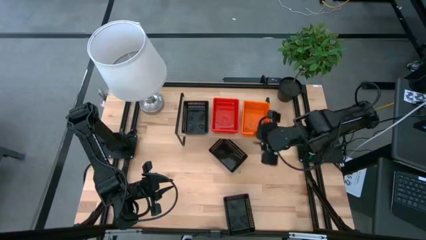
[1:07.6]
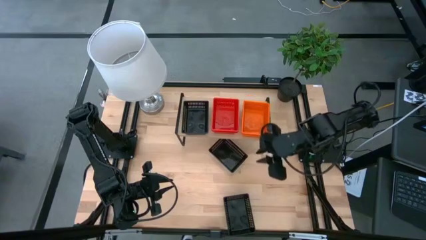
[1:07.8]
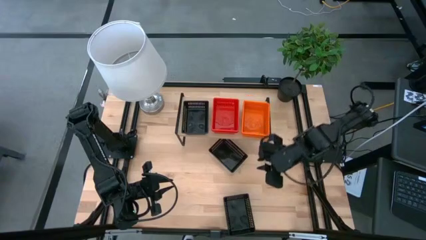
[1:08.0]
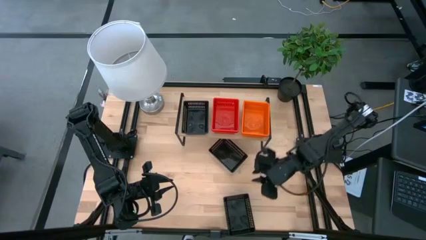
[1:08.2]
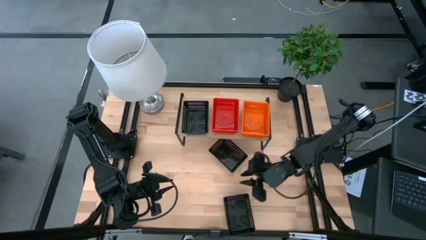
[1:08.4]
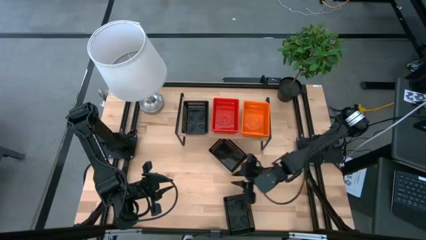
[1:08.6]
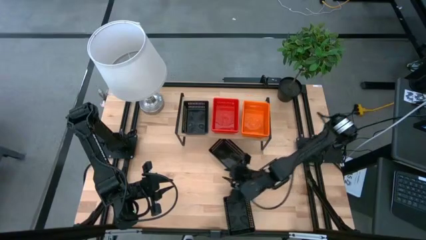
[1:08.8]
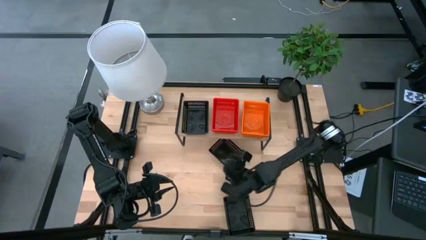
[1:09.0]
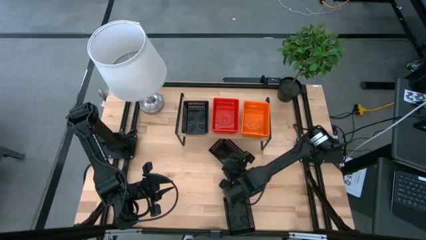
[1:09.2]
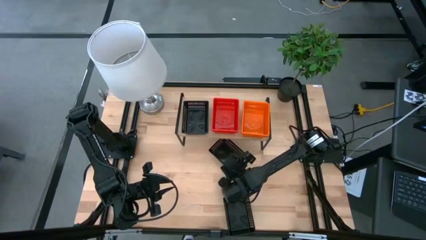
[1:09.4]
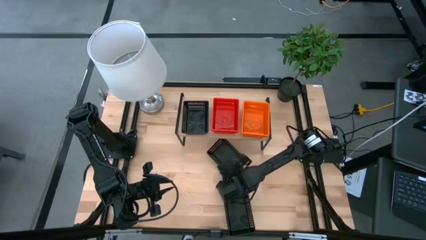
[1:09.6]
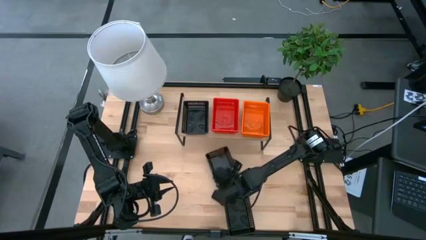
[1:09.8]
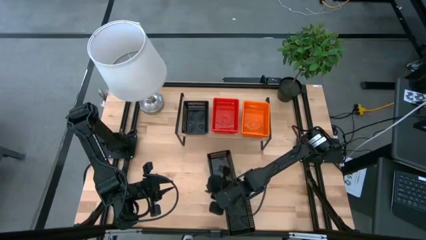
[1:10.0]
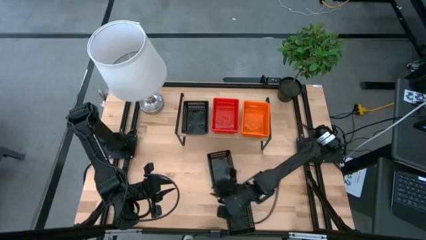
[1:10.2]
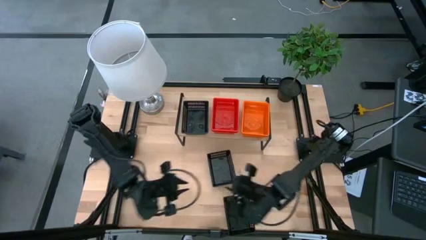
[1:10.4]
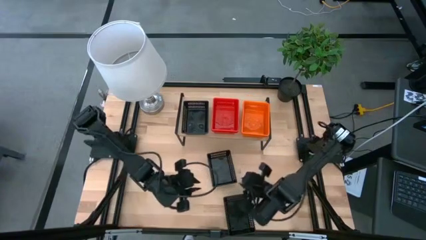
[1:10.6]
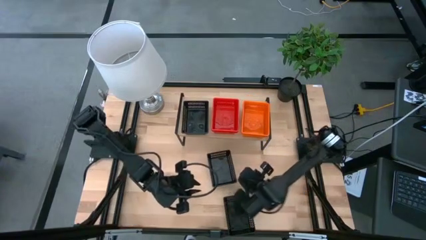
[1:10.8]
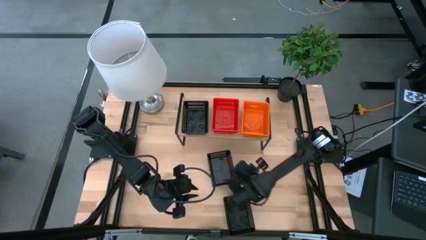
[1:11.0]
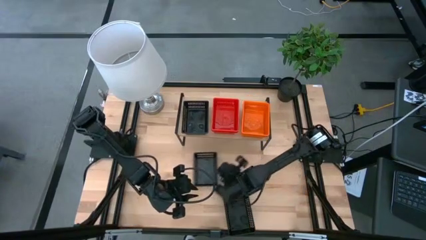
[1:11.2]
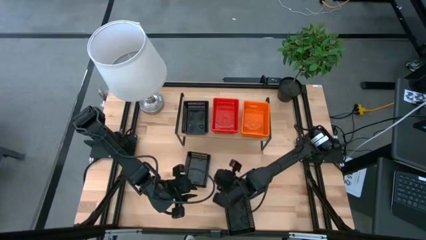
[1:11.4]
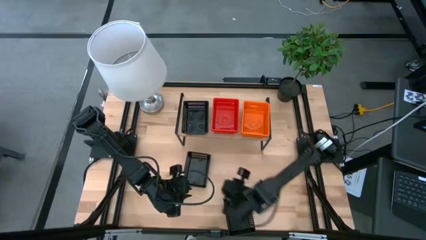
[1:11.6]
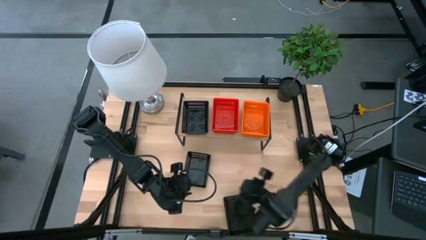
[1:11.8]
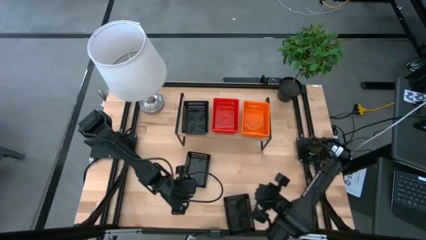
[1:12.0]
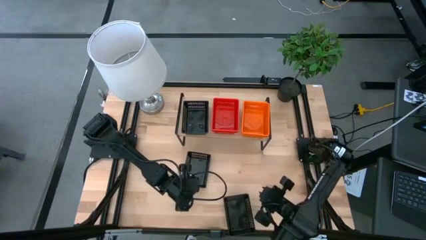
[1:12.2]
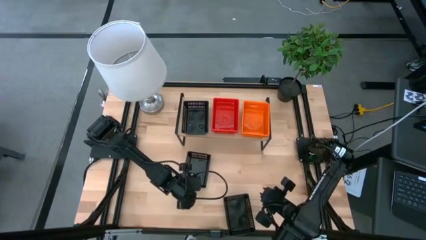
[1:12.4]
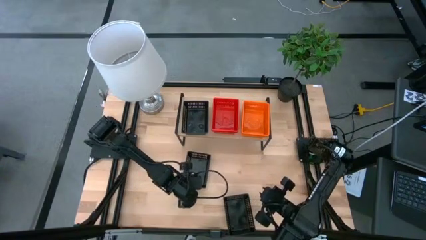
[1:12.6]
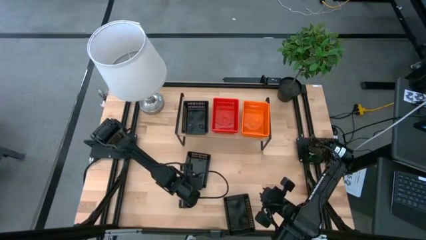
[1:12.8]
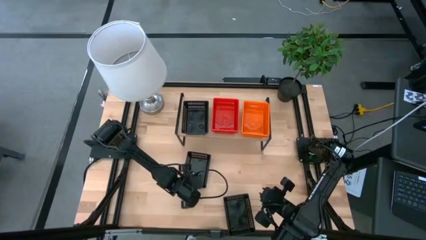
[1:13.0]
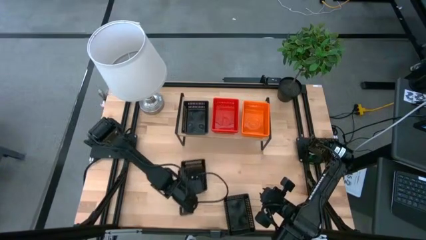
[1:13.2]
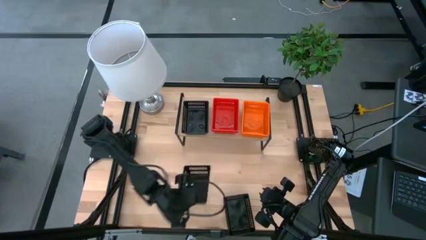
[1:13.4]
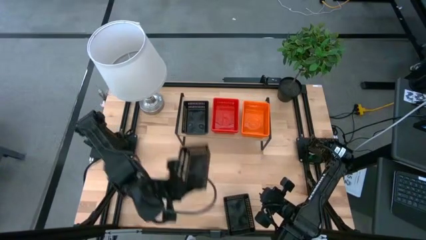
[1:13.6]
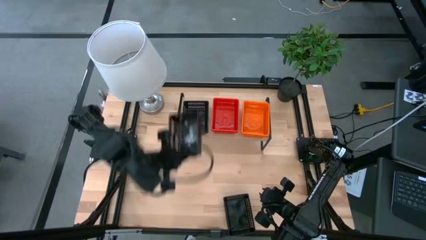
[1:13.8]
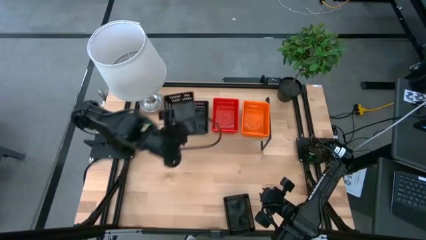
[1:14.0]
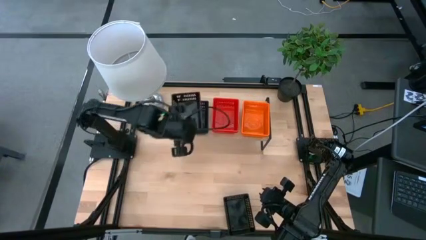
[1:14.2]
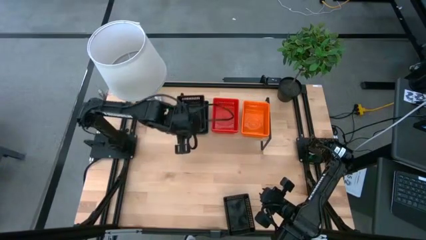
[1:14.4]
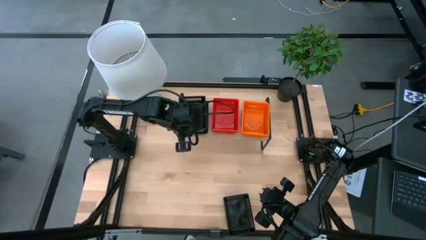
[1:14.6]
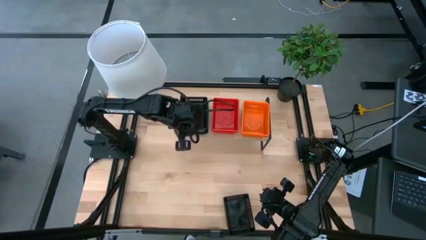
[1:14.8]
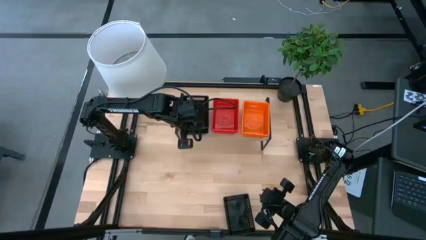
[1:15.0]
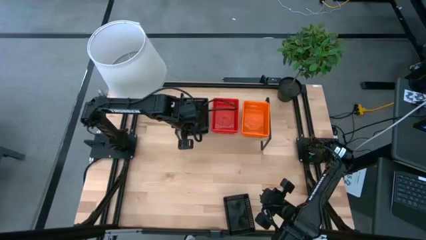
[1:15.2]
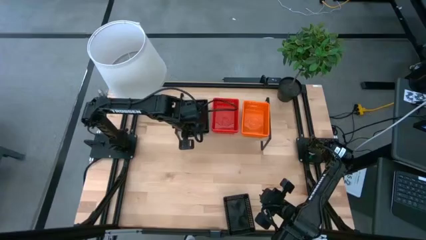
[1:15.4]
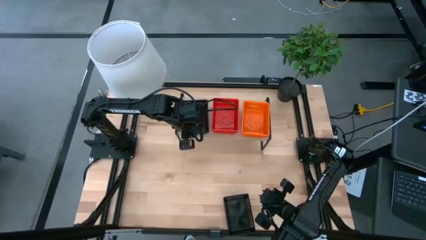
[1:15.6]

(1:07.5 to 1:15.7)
Task: Stack baskets on shelf by color
Stack the top black bin on top of the black bin on the shelf

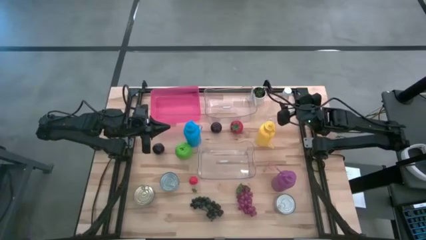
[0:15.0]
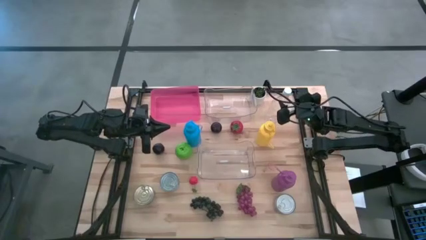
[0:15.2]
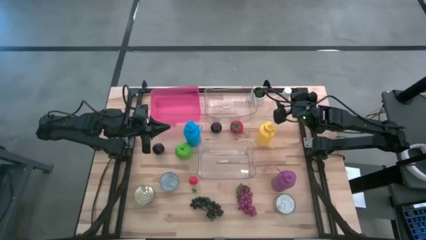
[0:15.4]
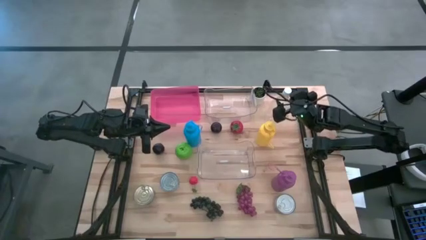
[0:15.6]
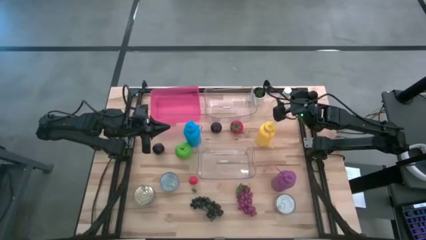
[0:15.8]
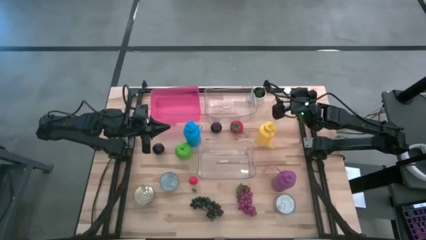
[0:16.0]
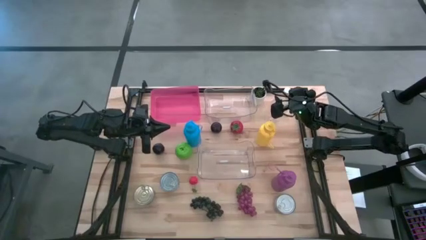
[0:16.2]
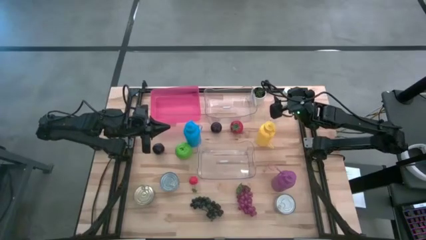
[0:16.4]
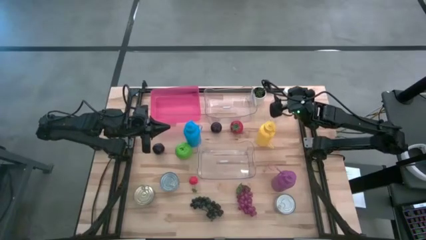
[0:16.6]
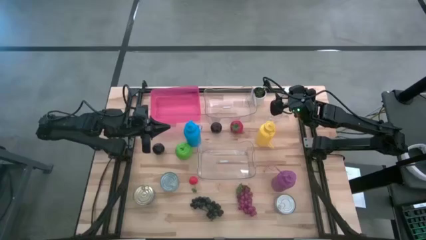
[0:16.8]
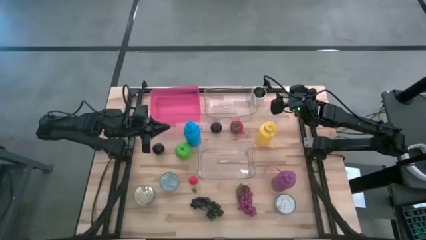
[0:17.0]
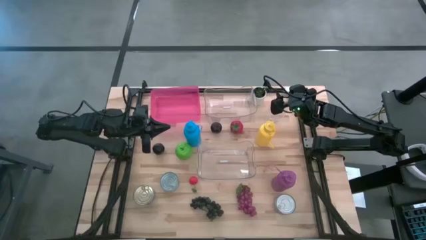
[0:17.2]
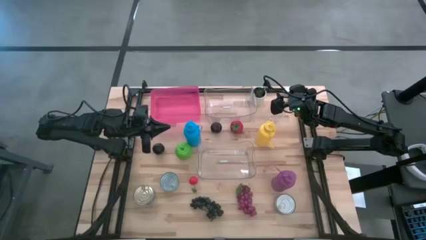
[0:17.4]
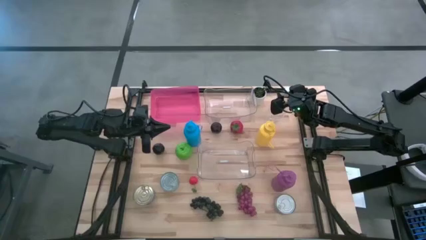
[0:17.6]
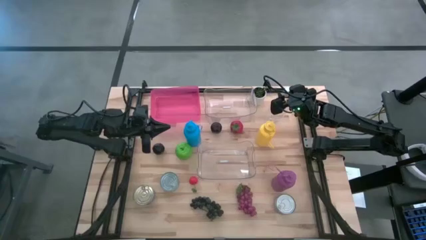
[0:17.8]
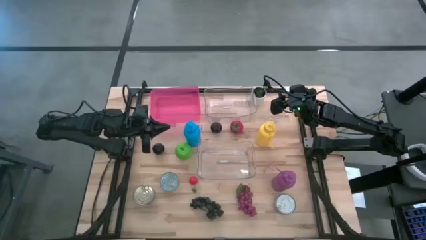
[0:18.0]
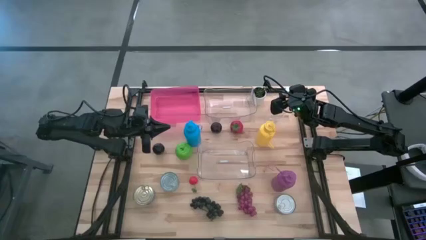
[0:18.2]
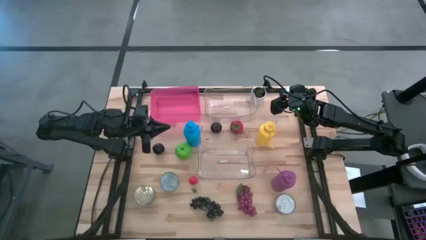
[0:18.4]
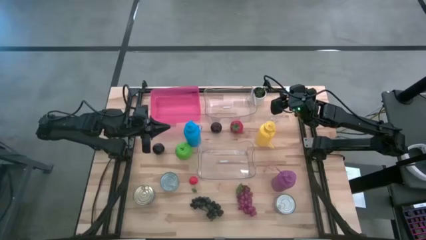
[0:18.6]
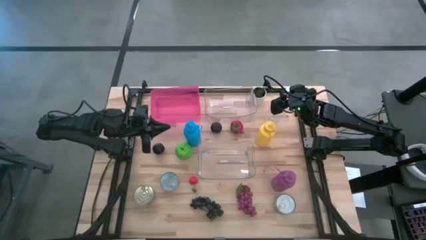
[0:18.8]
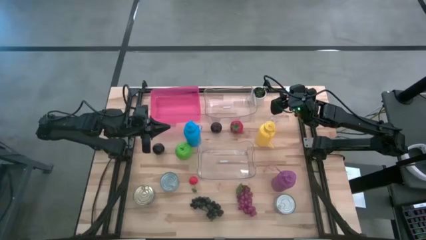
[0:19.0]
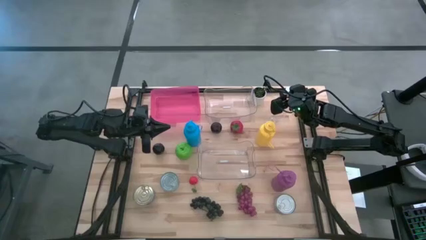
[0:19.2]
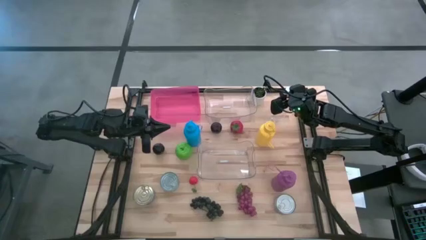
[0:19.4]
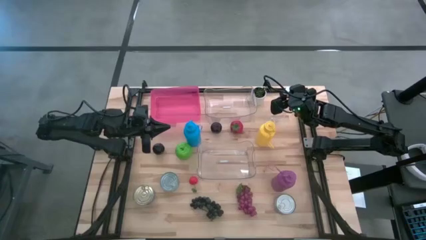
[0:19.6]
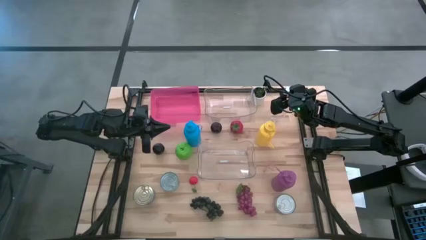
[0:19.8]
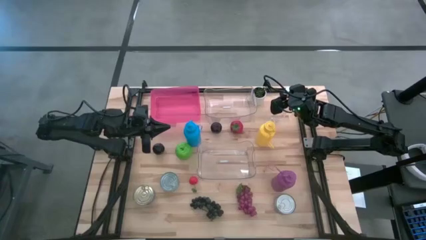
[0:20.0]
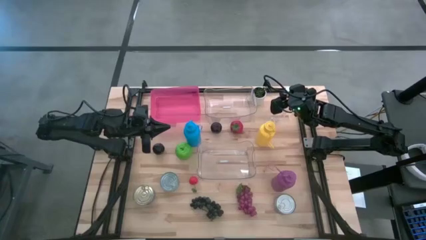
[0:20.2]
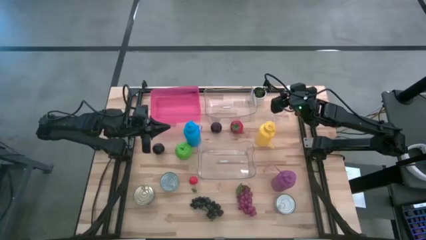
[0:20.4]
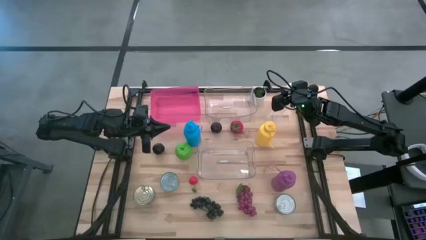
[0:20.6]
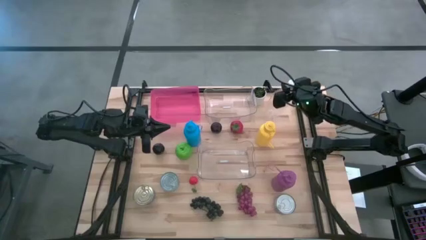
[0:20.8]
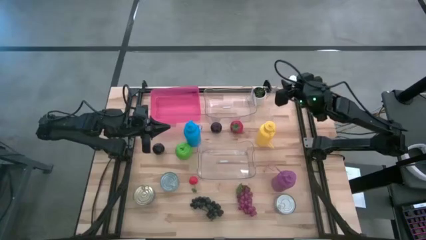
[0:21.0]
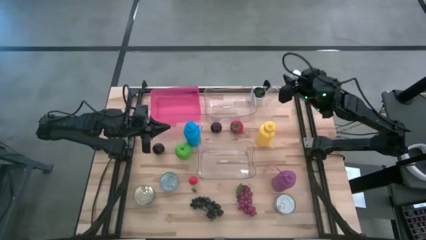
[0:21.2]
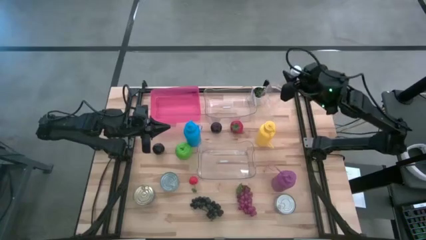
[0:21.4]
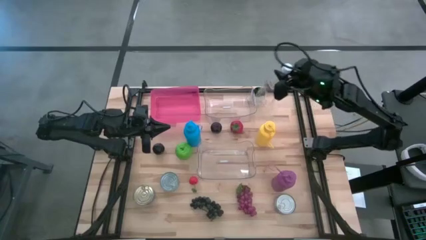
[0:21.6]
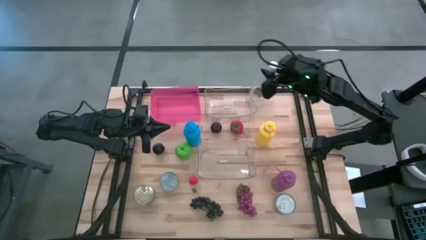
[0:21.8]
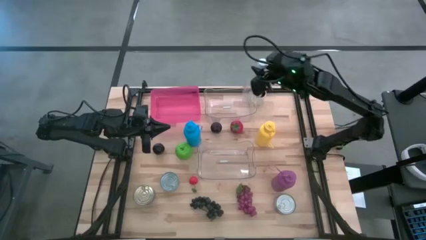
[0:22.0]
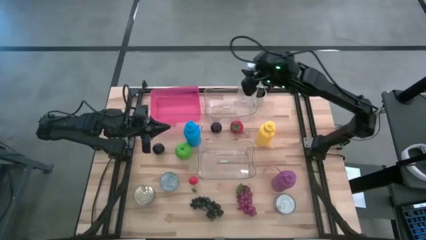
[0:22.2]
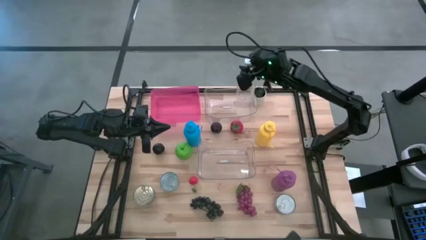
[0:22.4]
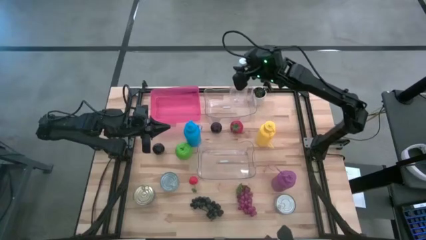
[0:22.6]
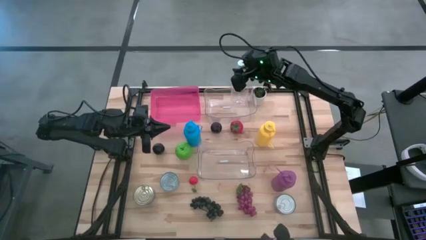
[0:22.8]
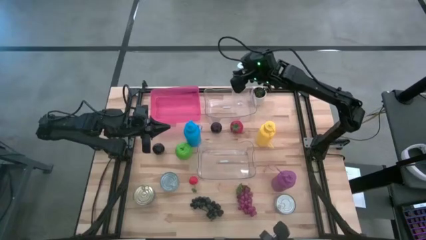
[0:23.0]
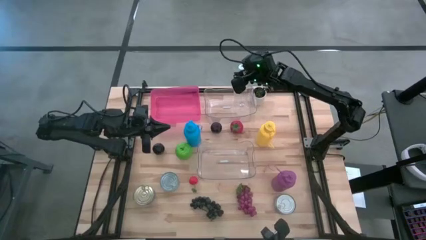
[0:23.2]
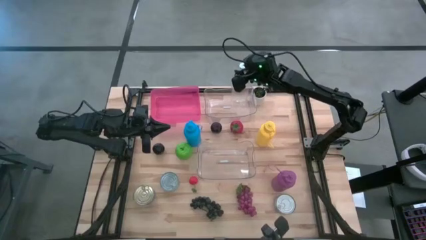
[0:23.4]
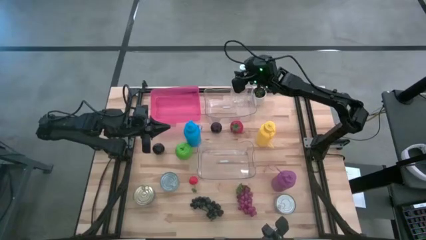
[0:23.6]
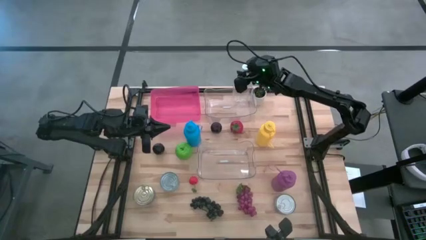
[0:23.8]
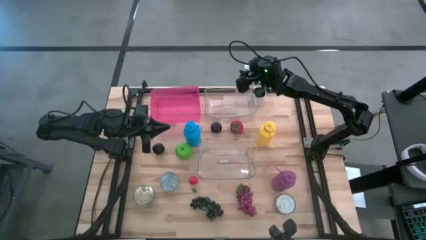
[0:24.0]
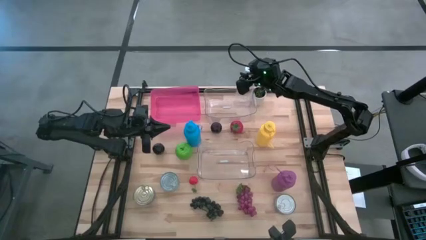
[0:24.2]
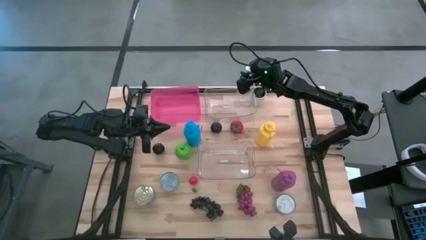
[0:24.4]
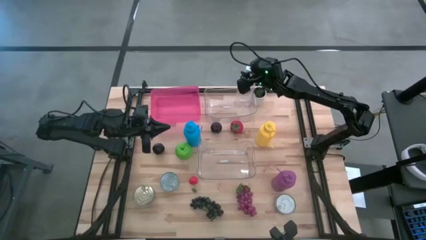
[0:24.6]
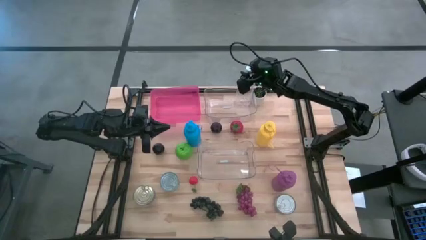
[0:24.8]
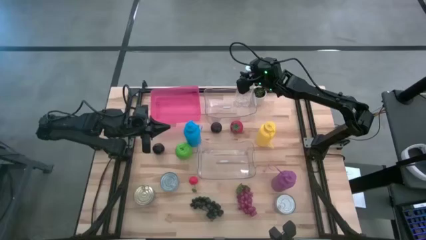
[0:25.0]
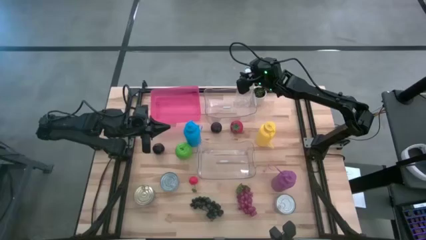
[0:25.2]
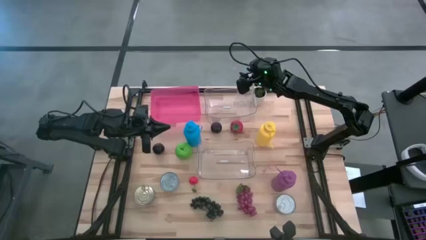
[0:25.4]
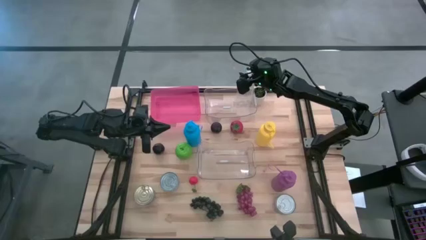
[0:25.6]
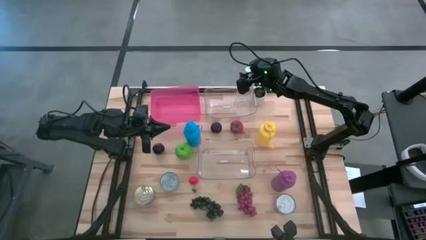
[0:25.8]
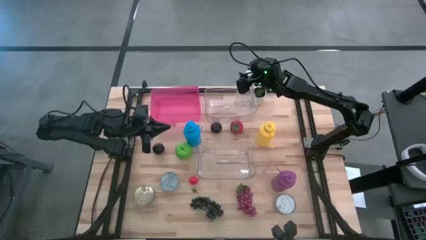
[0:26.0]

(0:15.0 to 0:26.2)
Task: Pick & Place Food Item
Put the transparent bottle into the top transparent bin
